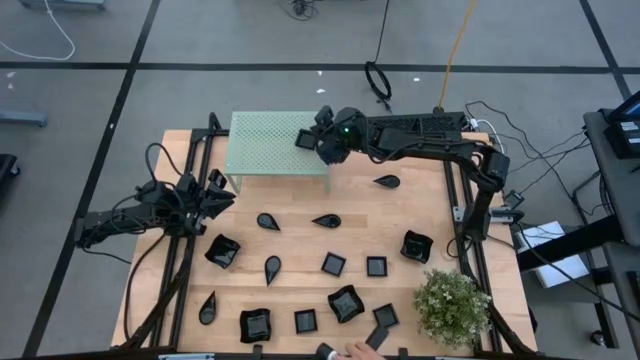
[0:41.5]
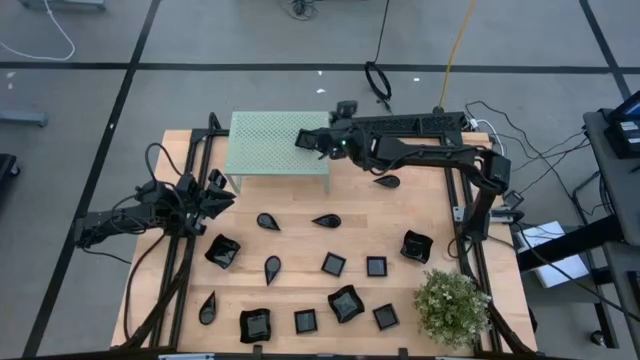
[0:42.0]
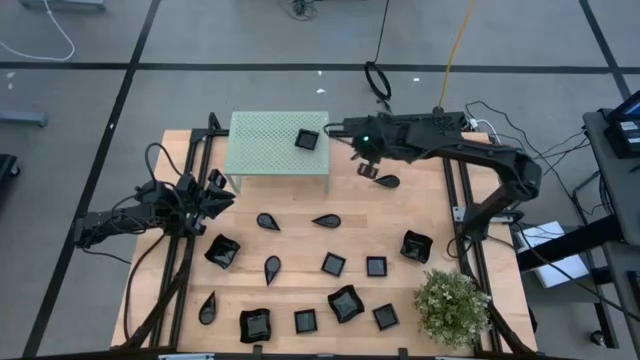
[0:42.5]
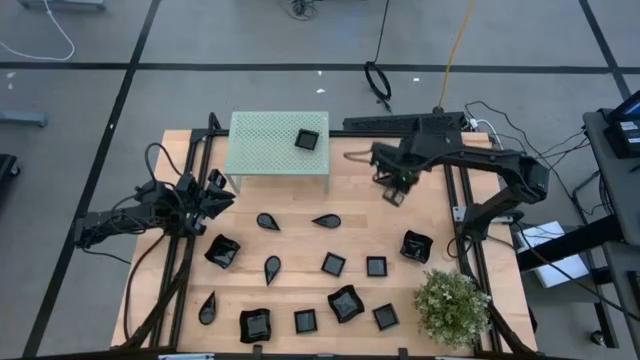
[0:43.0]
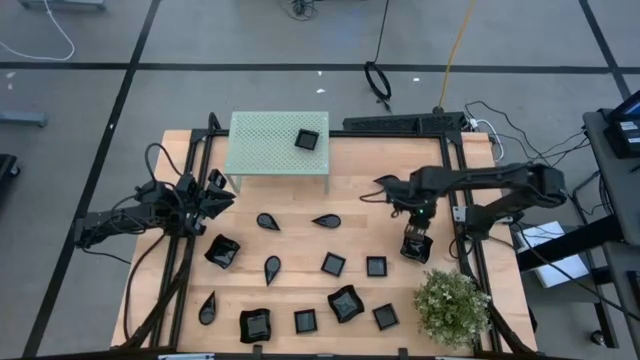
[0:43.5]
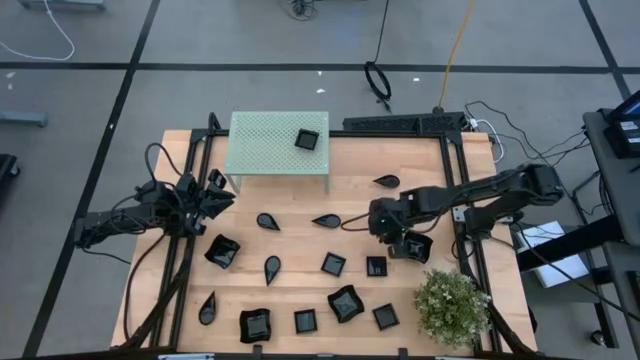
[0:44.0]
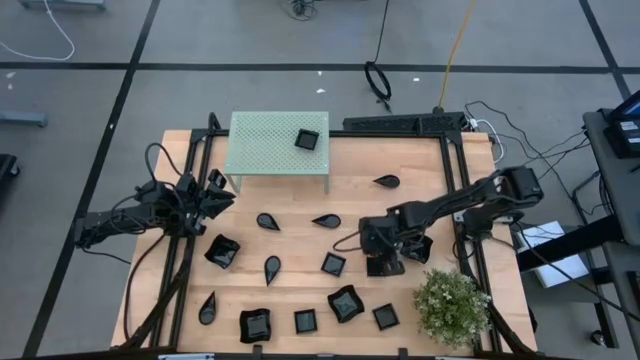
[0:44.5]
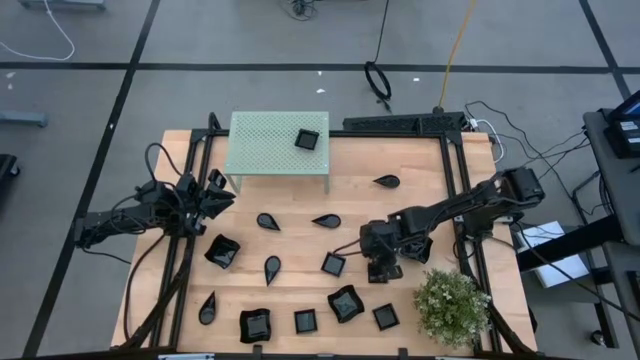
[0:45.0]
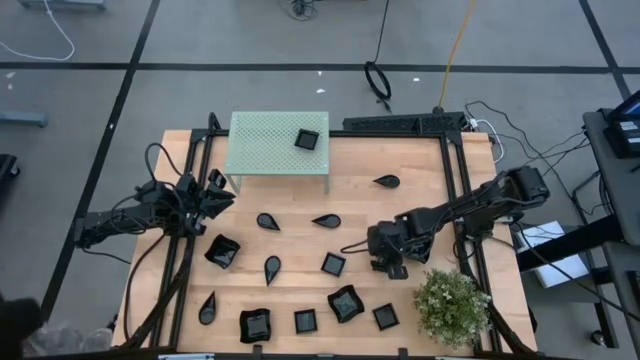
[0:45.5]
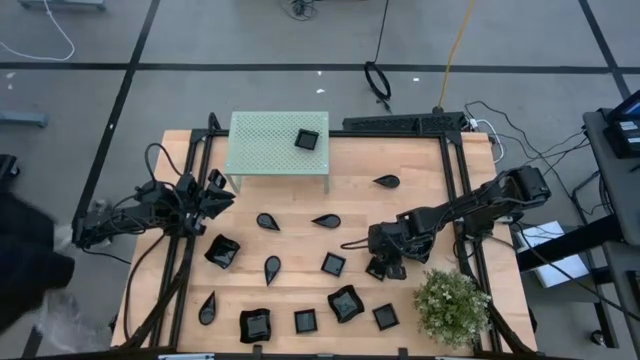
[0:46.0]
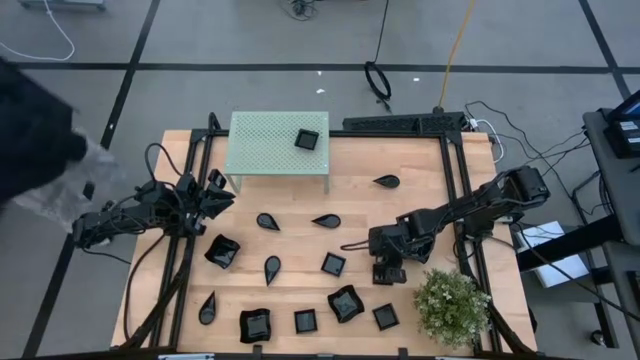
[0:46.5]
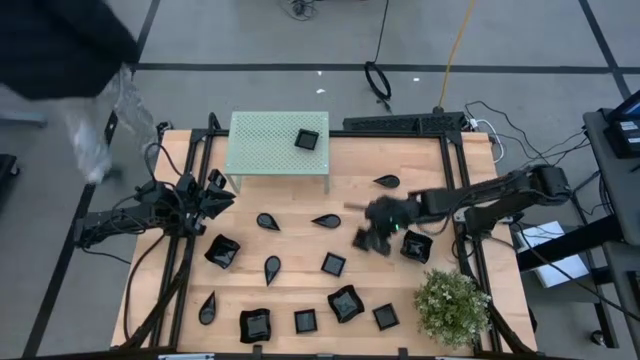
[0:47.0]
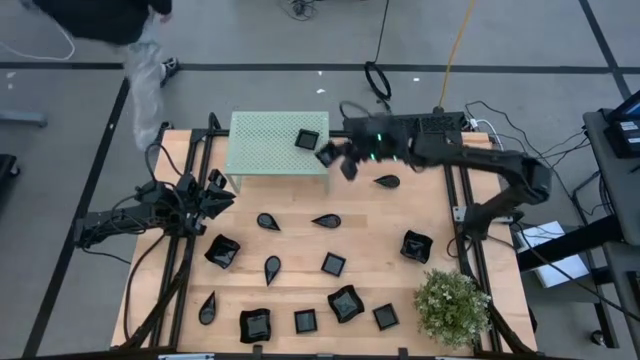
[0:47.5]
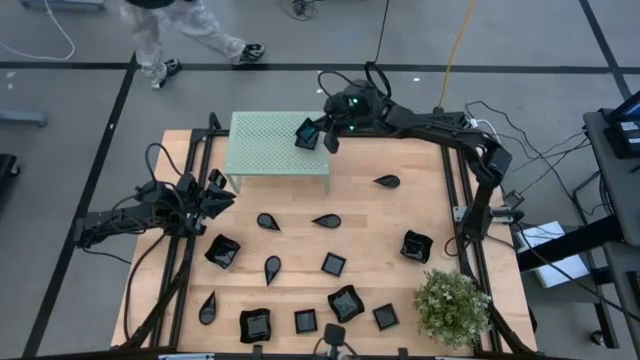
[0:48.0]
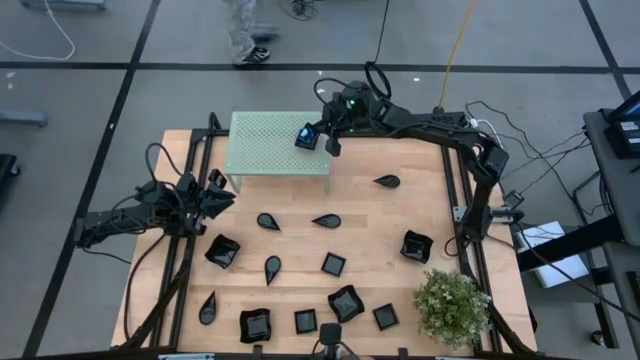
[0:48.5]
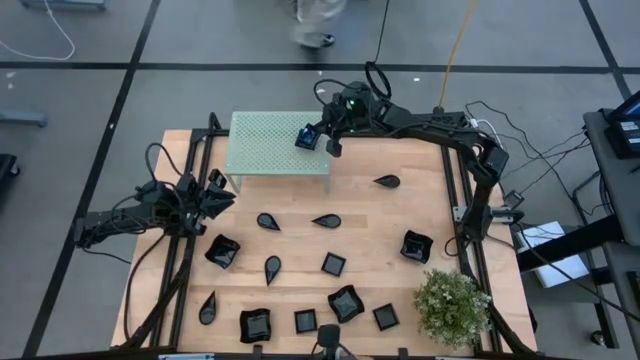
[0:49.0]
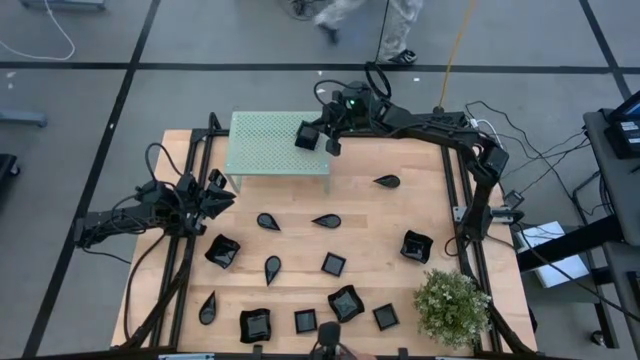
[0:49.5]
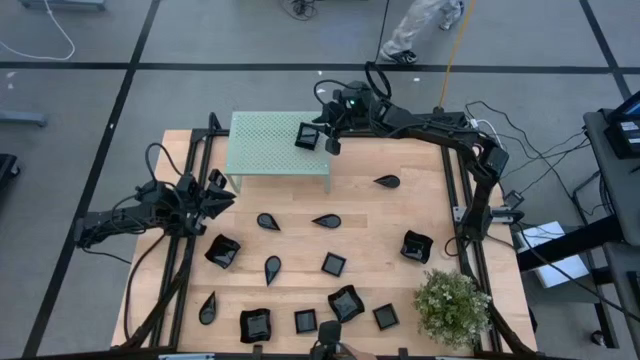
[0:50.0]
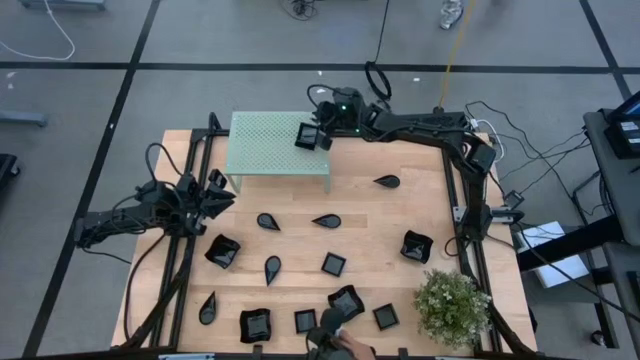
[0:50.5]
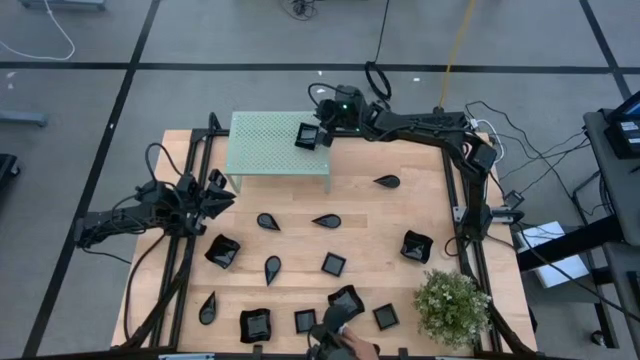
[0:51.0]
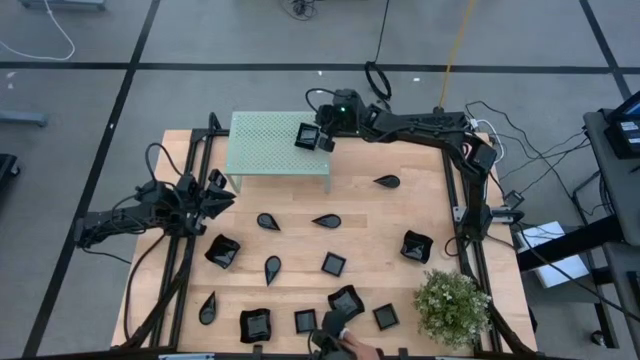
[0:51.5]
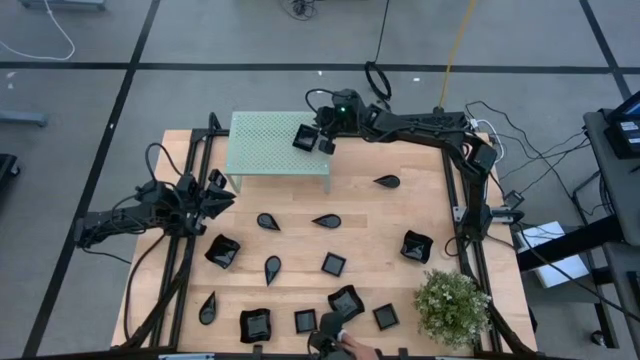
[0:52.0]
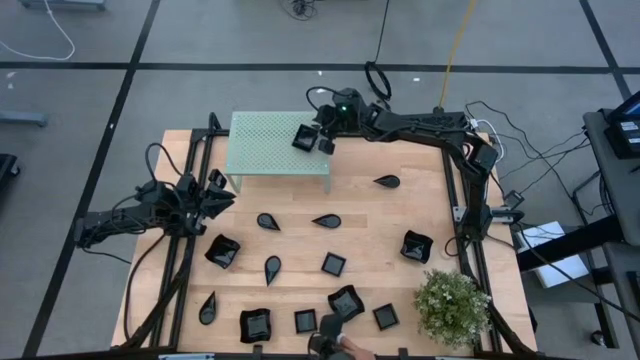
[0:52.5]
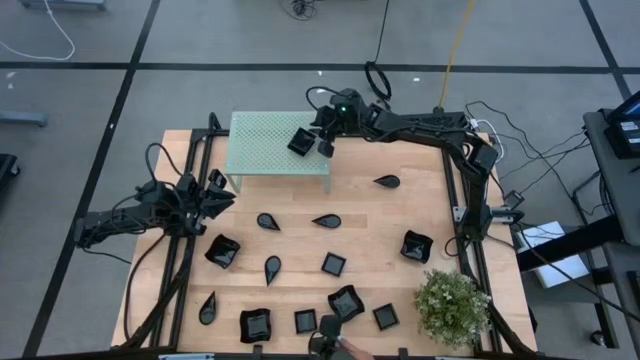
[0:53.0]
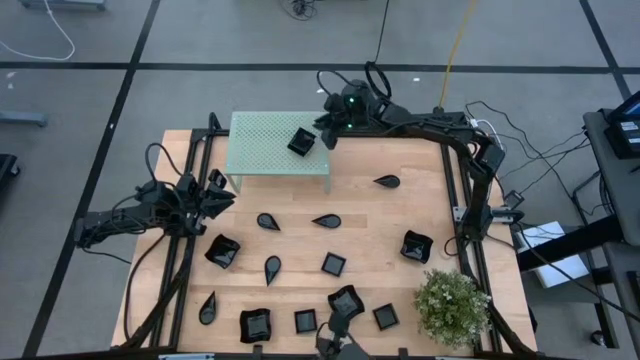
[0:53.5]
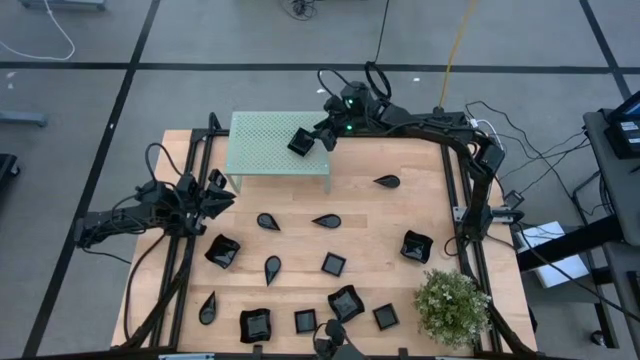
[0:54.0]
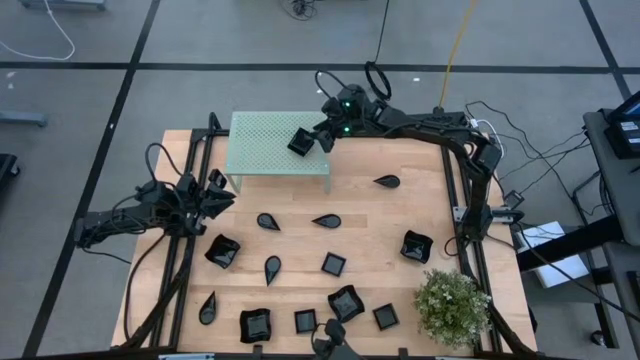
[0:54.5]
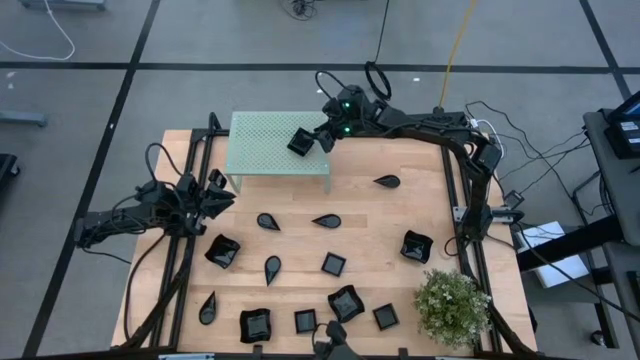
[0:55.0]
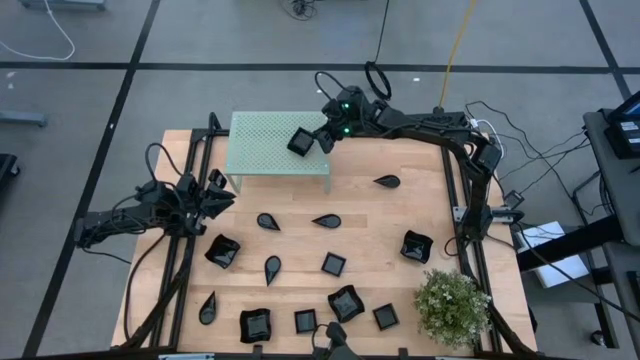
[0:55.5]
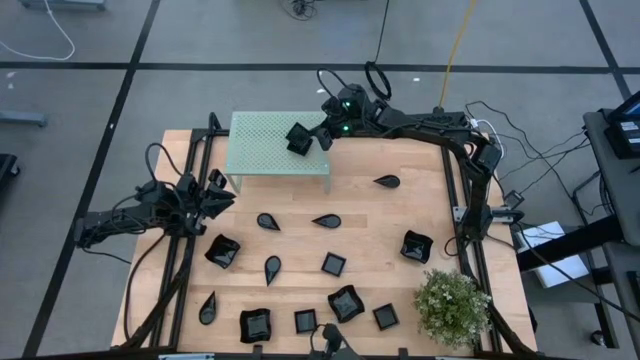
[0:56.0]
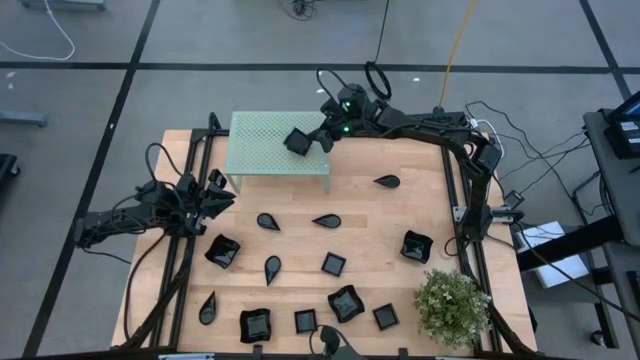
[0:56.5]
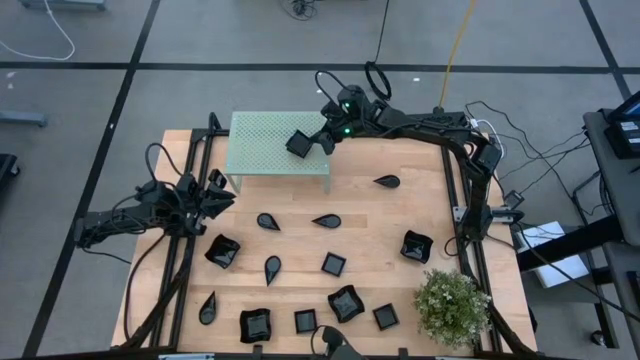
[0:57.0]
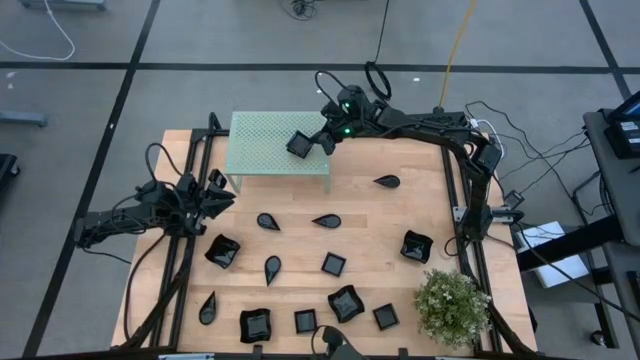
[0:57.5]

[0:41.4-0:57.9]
Task: Pick & Place Mini shaped plates
Stack the square plate on top of the stacked square plates on the shelf

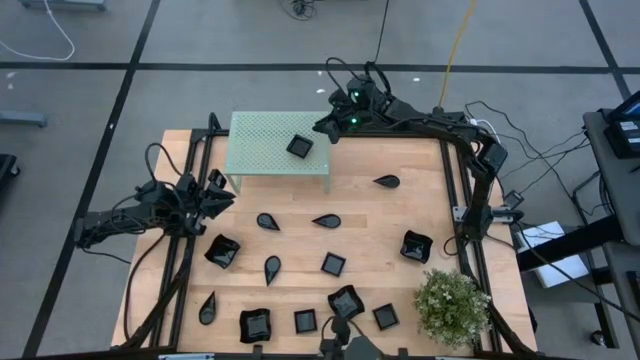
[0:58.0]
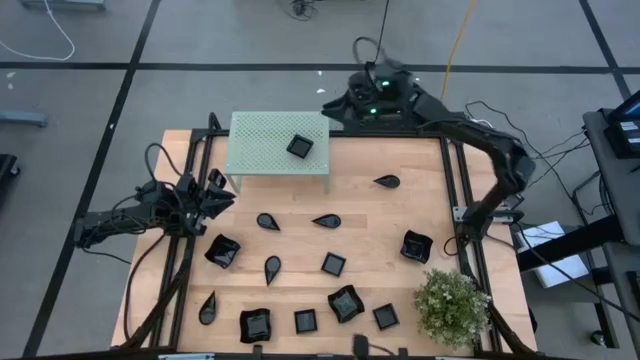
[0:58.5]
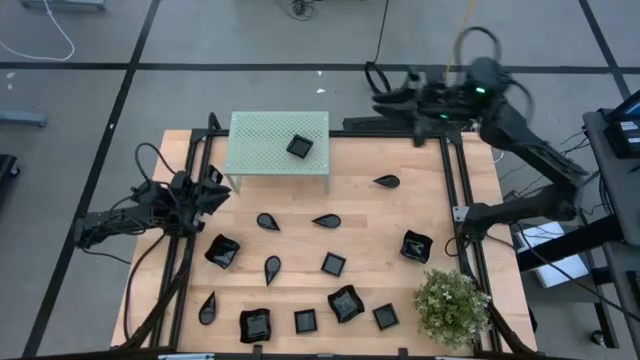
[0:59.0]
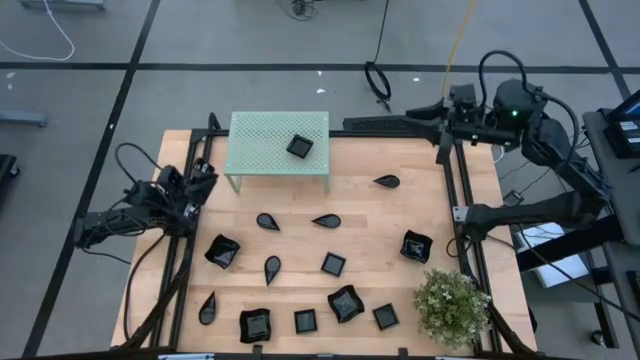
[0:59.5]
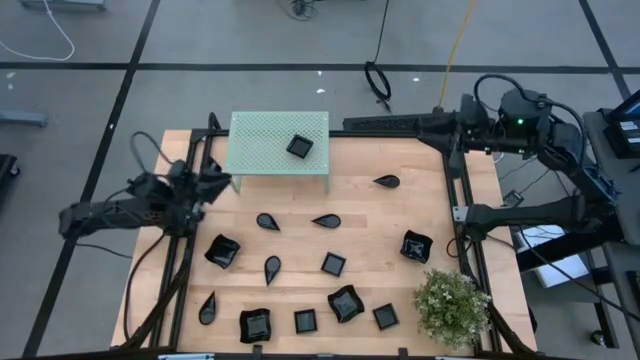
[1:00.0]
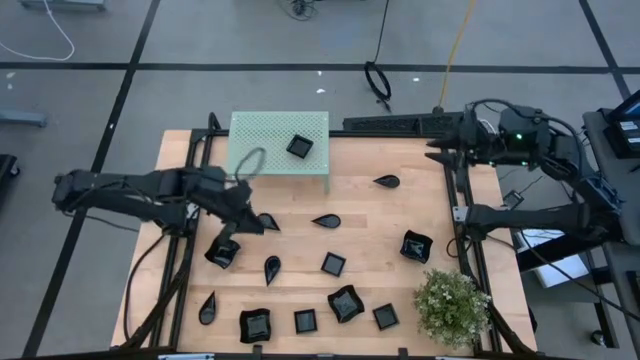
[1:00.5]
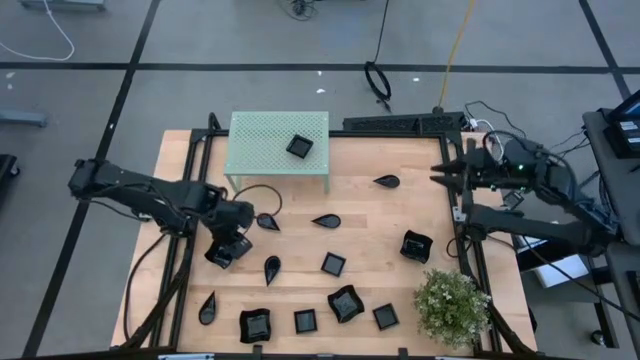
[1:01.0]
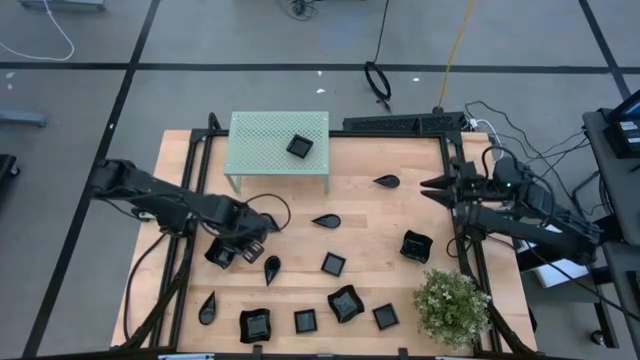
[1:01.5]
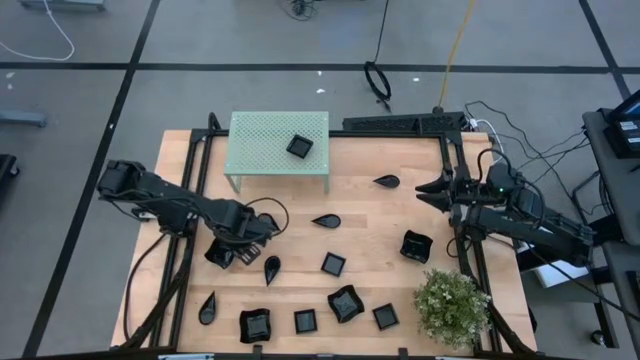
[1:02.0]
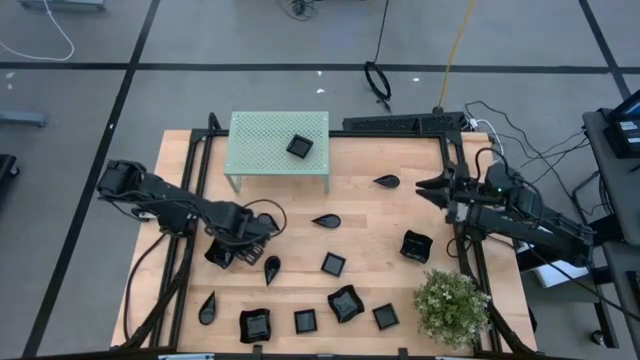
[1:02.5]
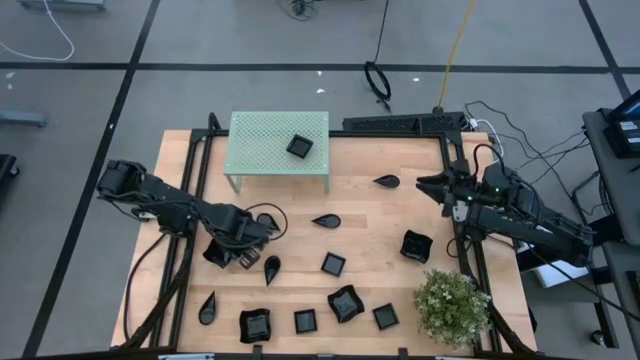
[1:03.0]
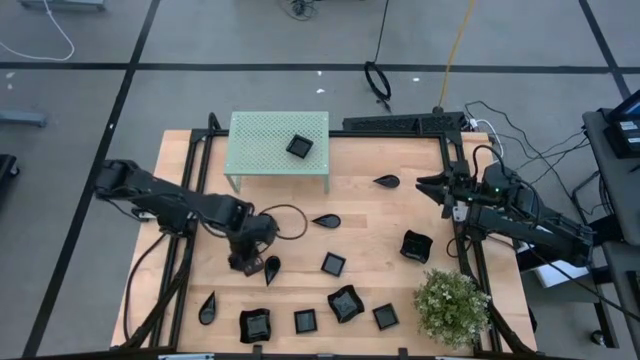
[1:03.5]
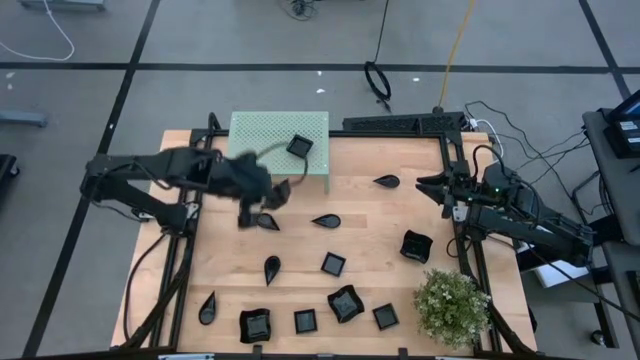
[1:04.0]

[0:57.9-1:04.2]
Put the distorted square plate on the shelf
